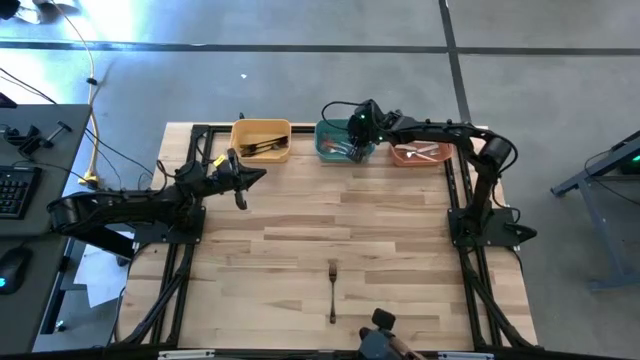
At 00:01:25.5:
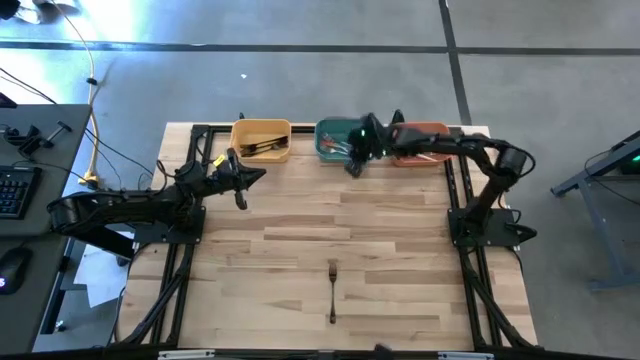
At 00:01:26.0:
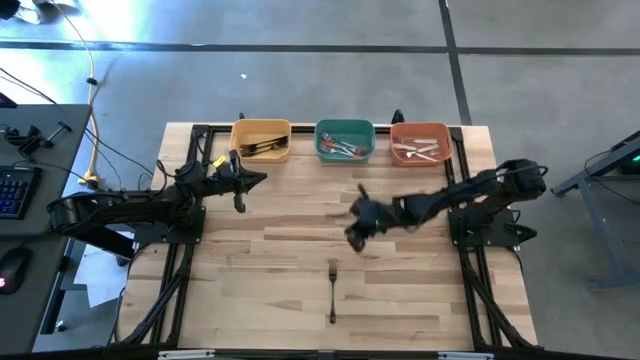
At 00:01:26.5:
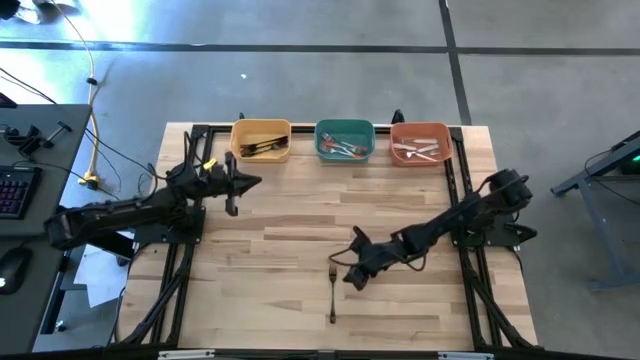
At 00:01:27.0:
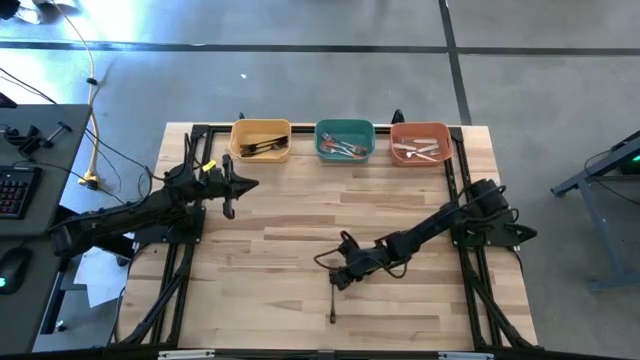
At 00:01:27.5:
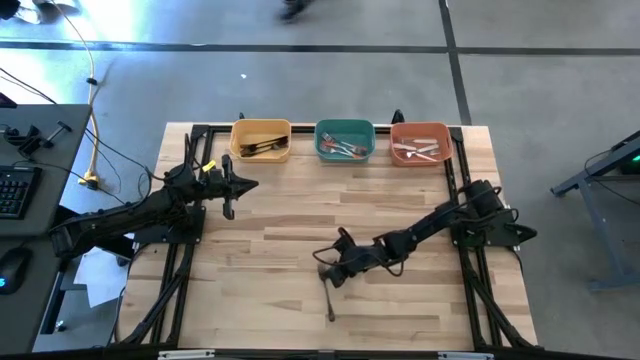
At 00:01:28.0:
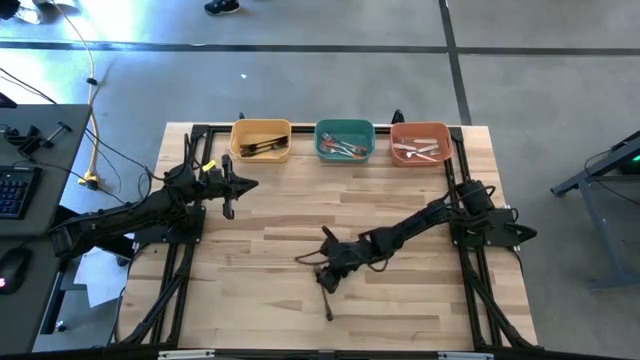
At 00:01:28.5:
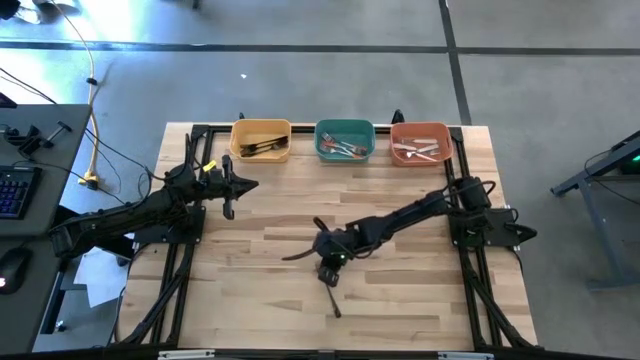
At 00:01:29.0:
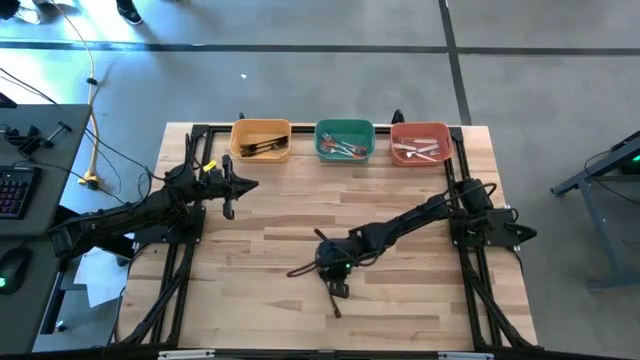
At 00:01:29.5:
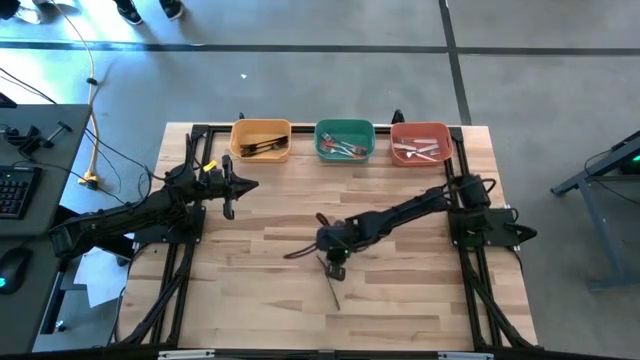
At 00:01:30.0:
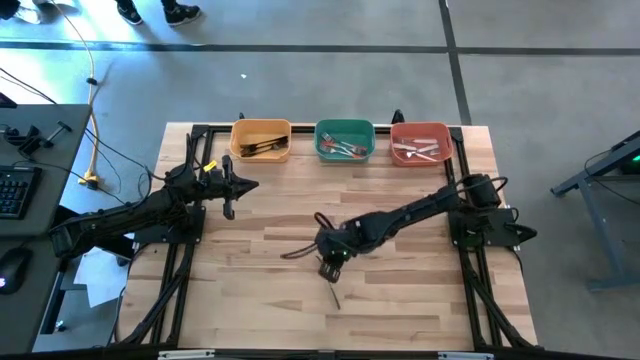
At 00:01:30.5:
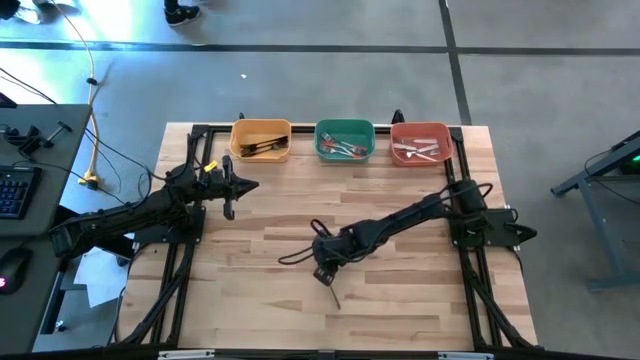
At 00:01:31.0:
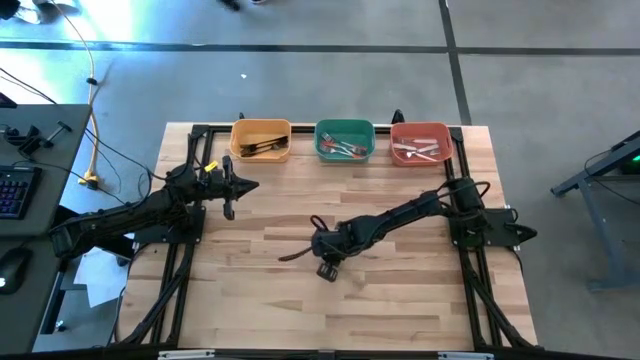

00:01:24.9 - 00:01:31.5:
Task: Sort silverware by color (type)
Put the black fork into the yellow bin

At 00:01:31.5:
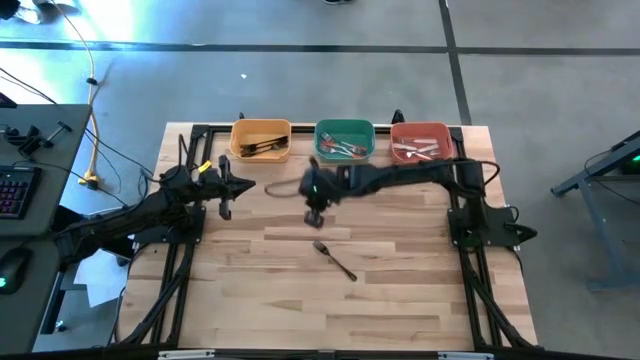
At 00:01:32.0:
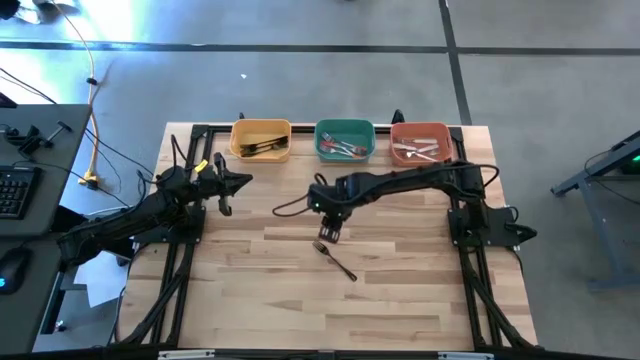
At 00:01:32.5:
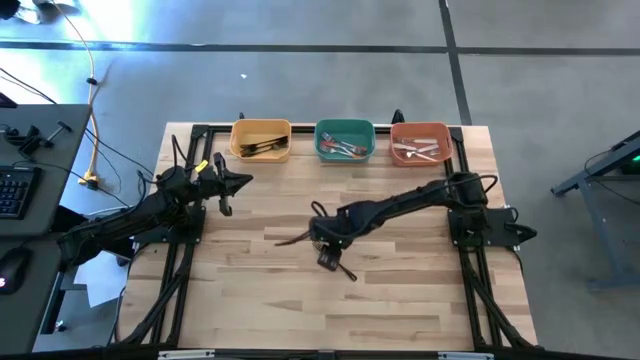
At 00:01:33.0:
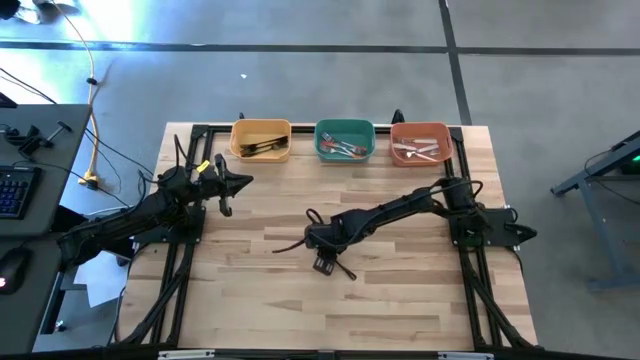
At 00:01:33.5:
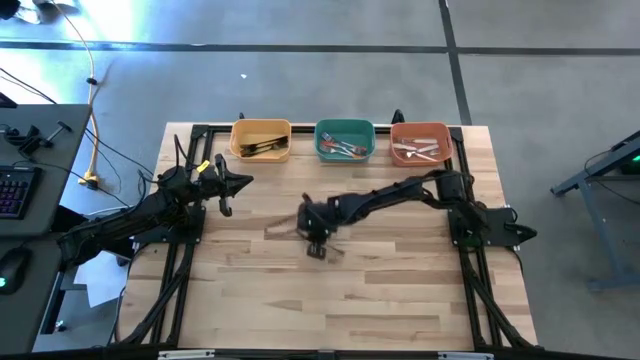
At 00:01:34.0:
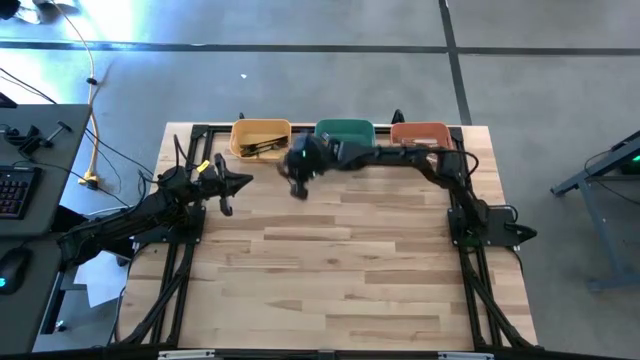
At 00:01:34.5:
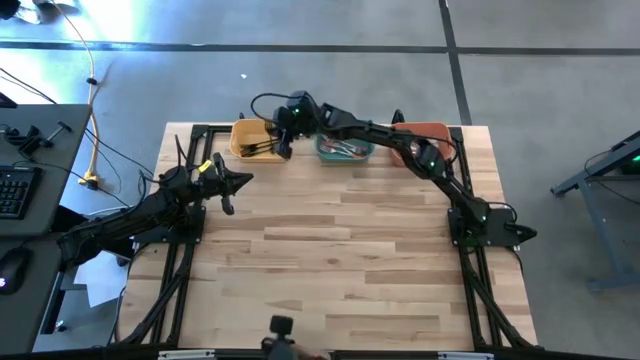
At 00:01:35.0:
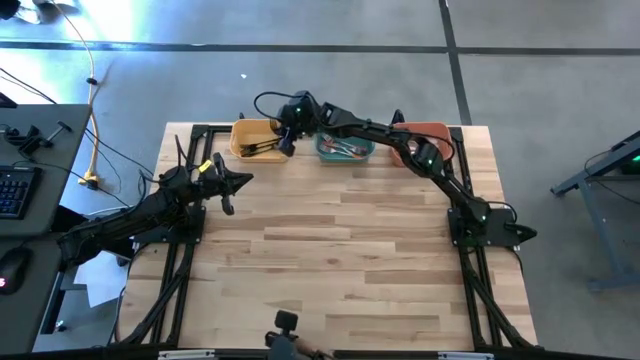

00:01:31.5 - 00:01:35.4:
Put the black fork into the yellow bin

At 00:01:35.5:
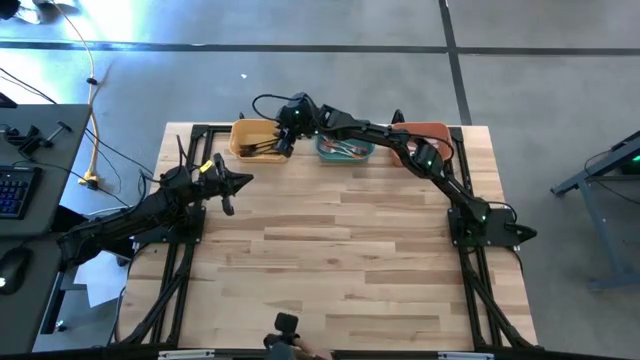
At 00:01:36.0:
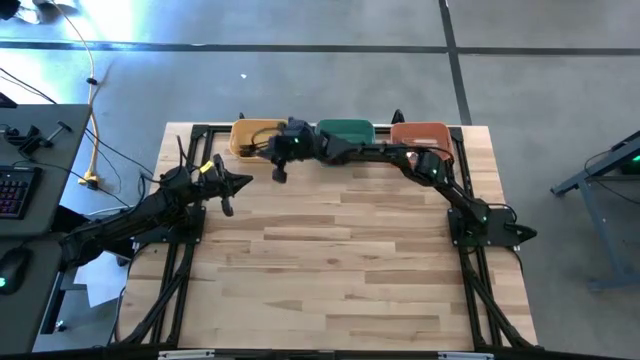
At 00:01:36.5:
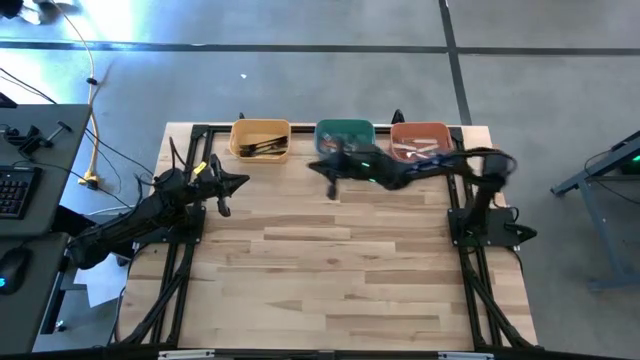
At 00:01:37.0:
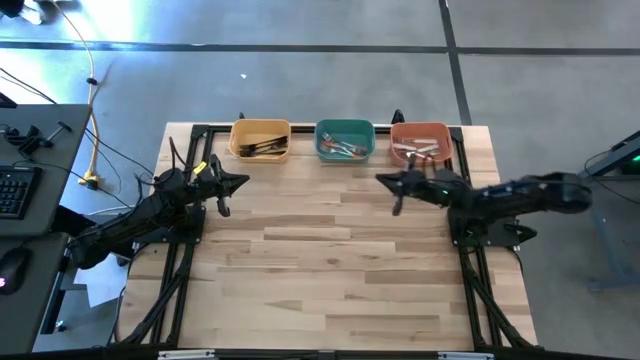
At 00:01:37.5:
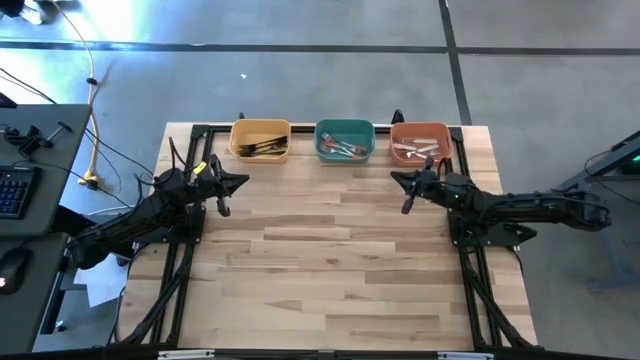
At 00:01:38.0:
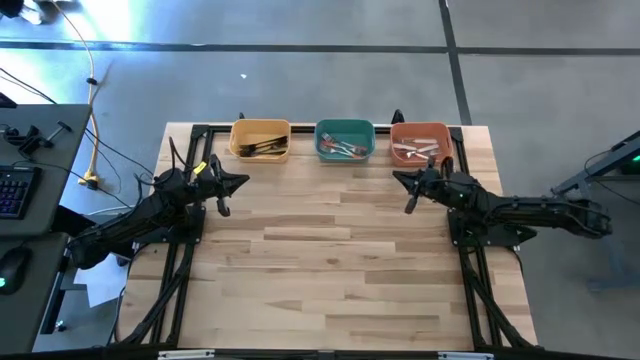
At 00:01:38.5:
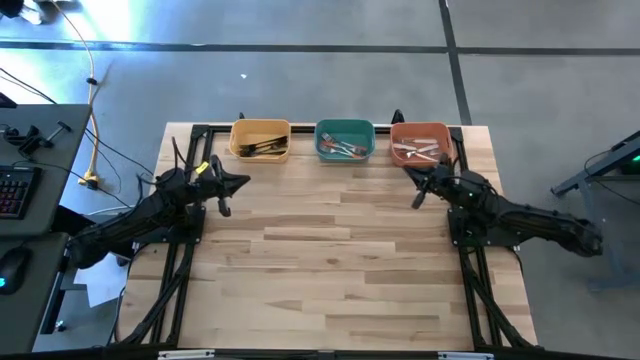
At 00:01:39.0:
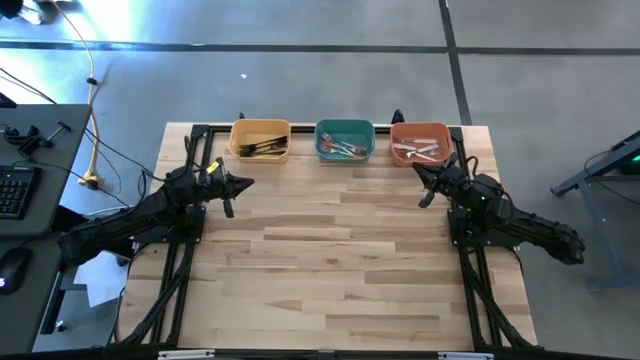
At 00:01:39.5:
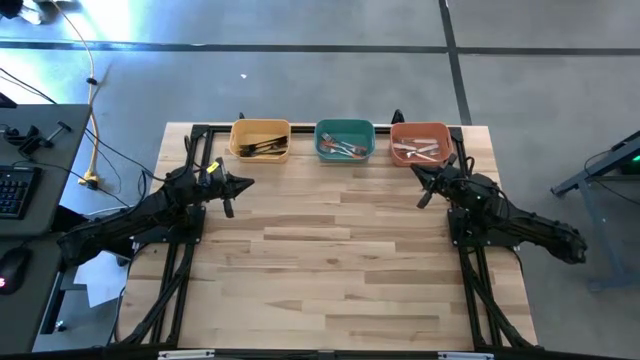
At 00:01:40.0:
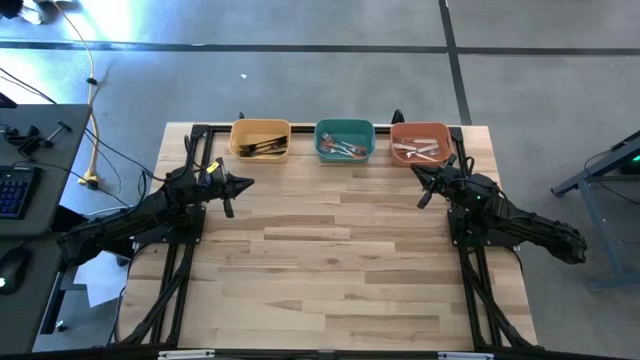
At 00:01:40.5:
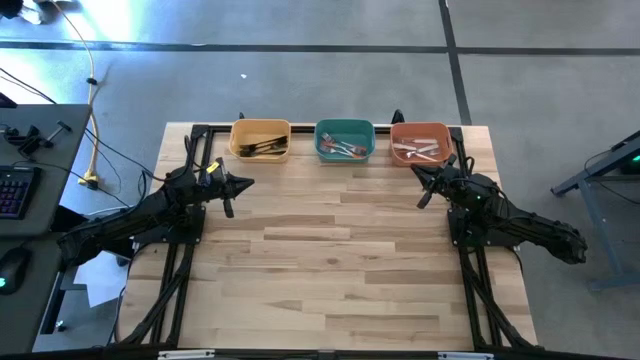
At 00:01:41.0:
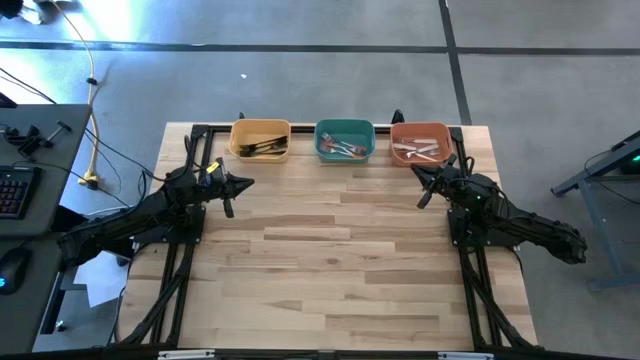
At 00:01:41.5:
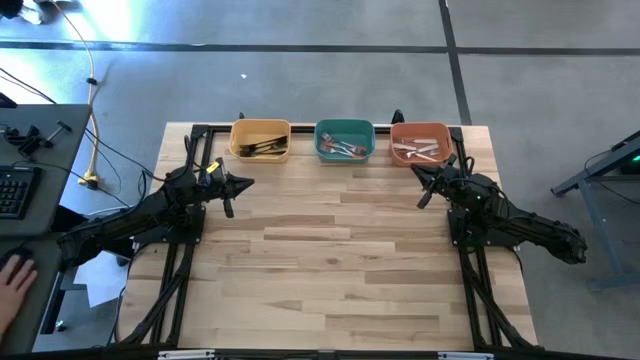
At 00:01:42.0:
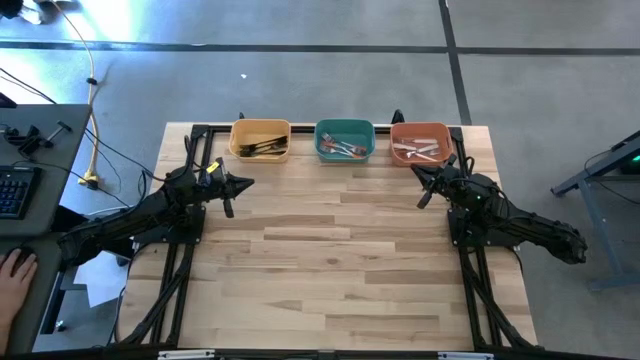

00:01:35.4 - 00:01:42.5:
Return to Home Position

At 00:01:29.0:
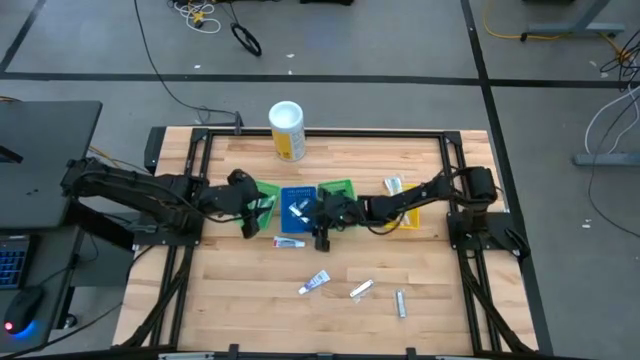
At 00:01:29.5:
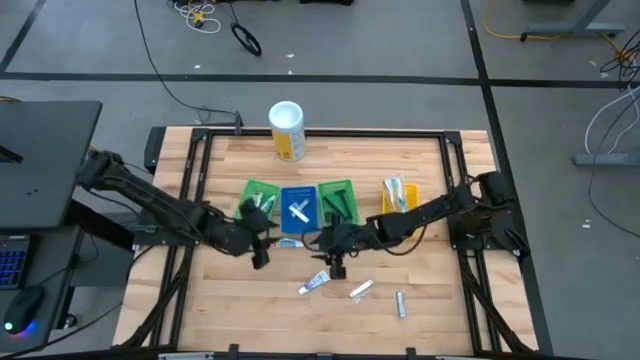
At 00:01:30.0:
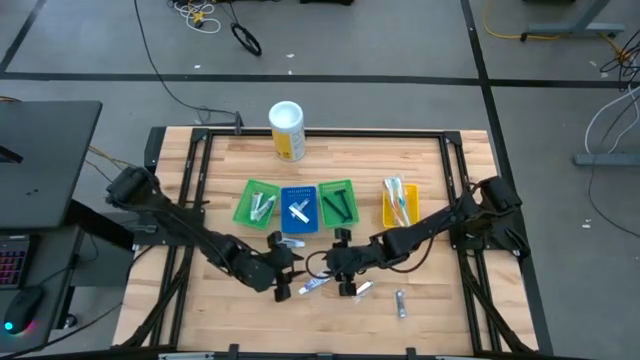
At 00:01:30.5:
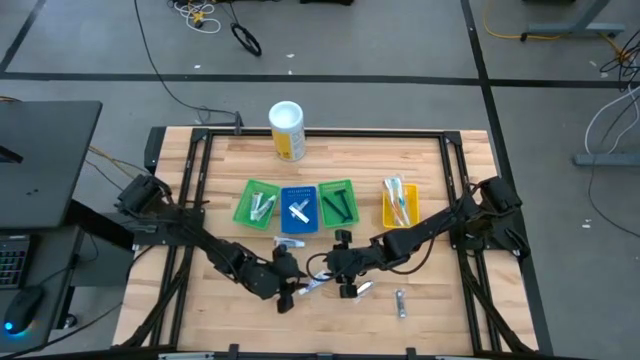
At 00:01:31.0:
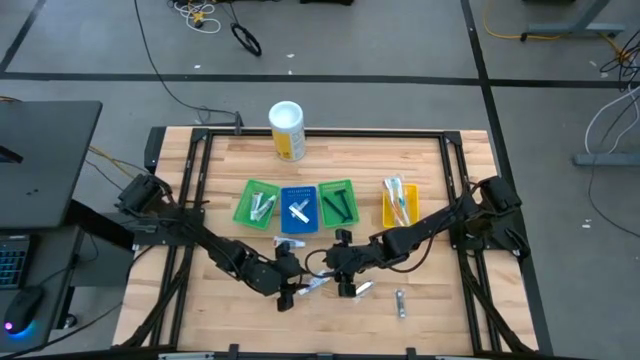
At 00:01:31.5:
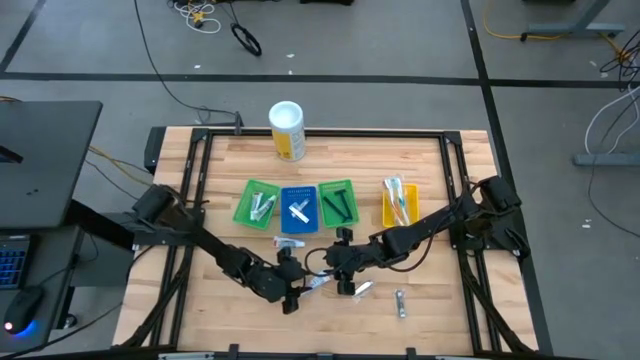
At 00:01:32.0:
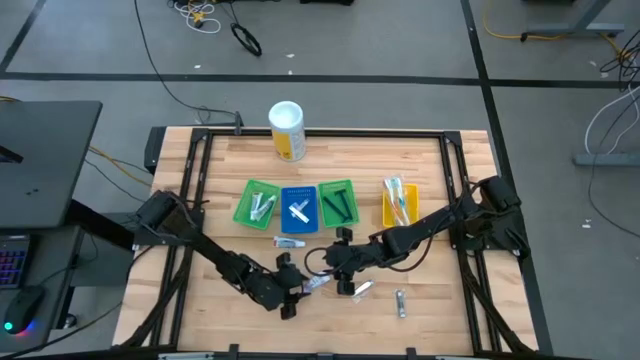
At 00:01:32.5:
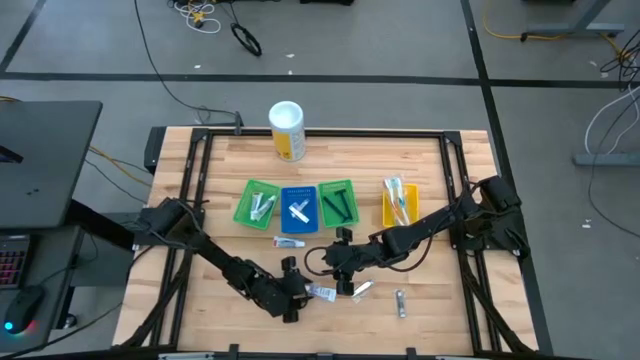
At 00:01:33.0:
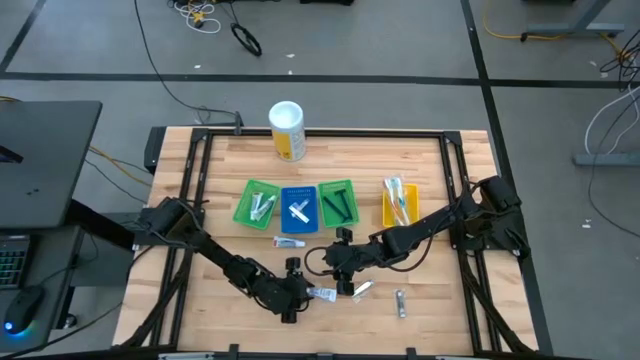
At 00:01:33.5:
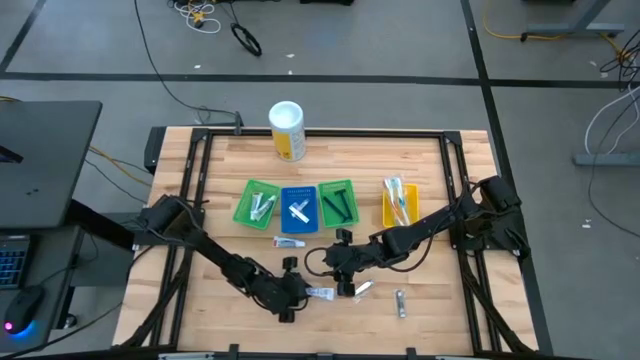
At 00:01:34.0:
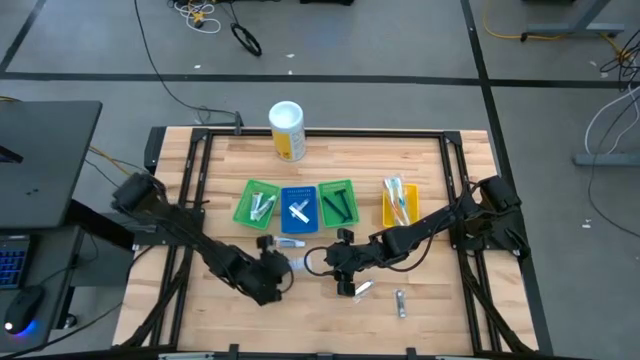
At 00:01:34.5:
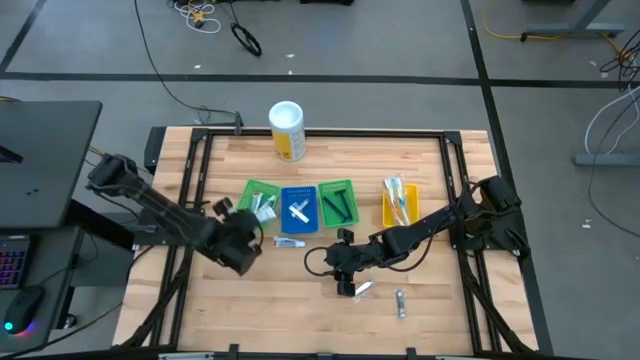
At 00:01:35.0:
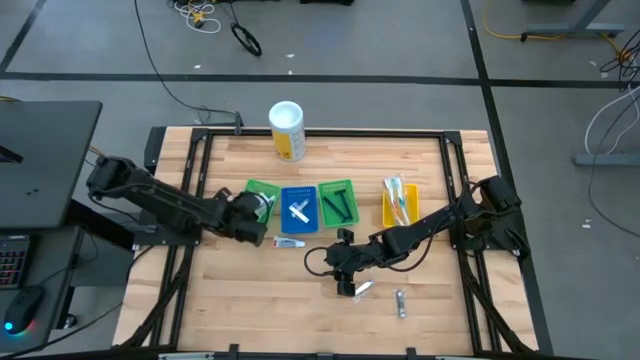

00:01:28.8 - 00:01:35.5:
Task: Pick & Place Travel size toiletries
Put the purple and white toothpaste into the left green bin
